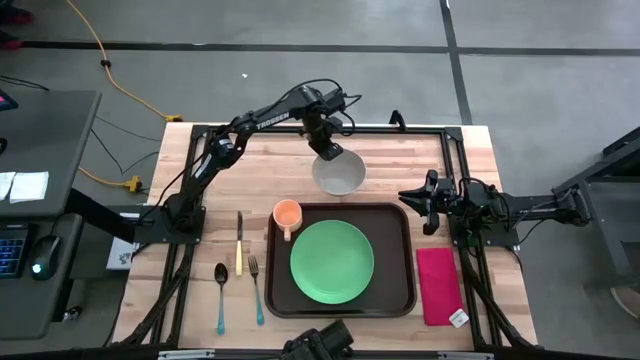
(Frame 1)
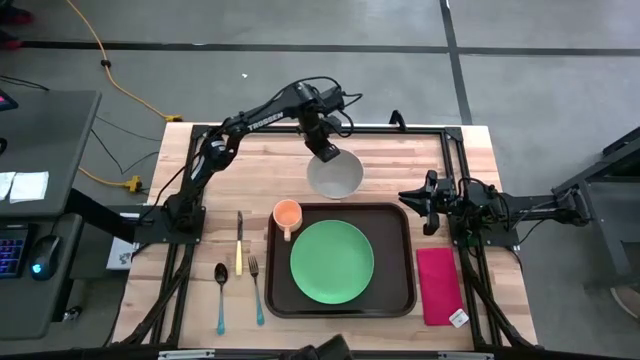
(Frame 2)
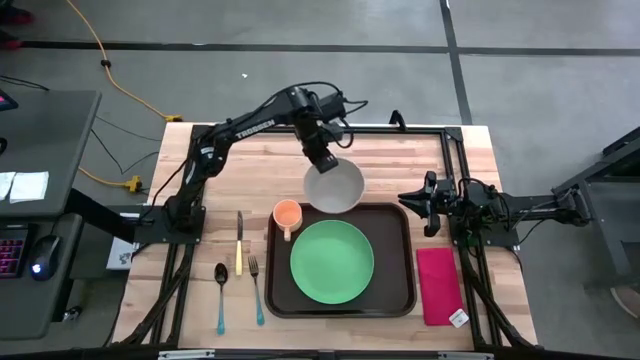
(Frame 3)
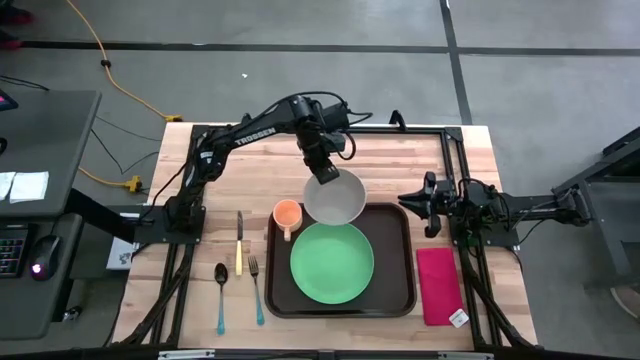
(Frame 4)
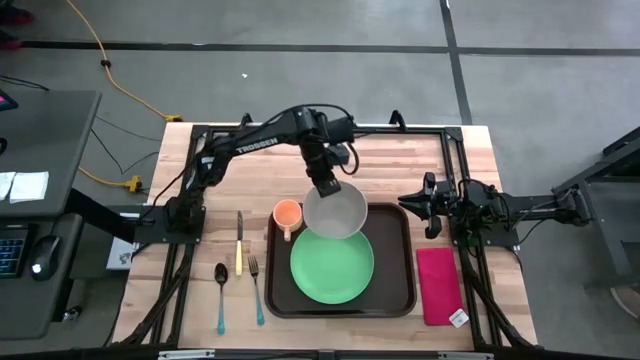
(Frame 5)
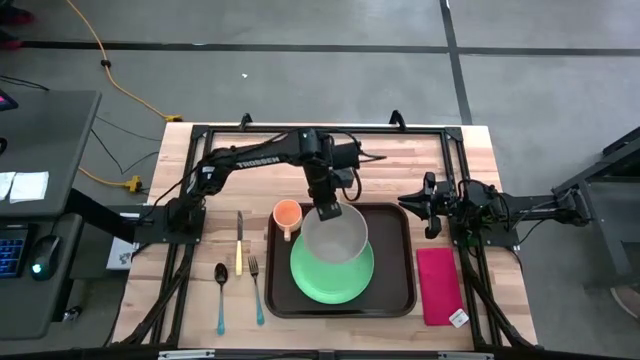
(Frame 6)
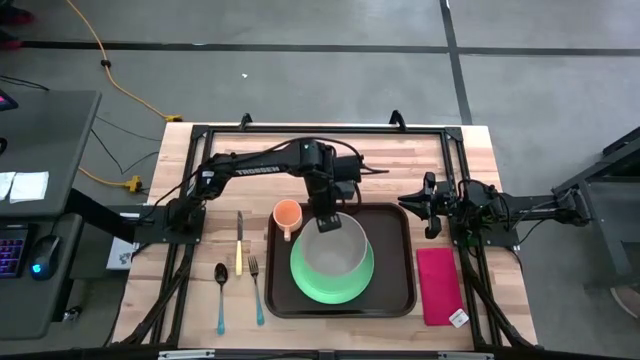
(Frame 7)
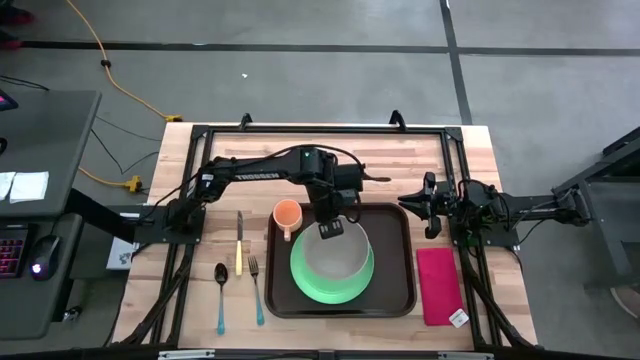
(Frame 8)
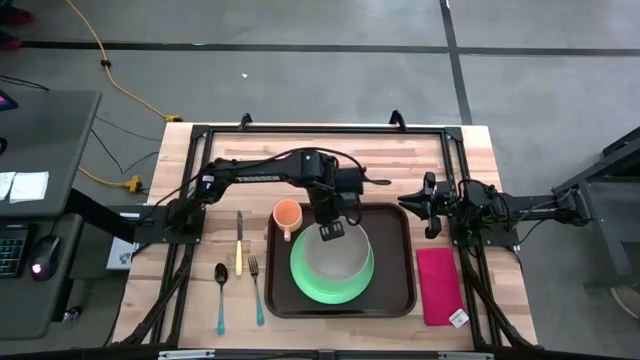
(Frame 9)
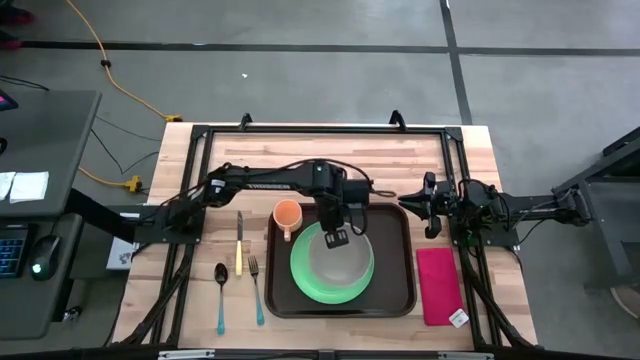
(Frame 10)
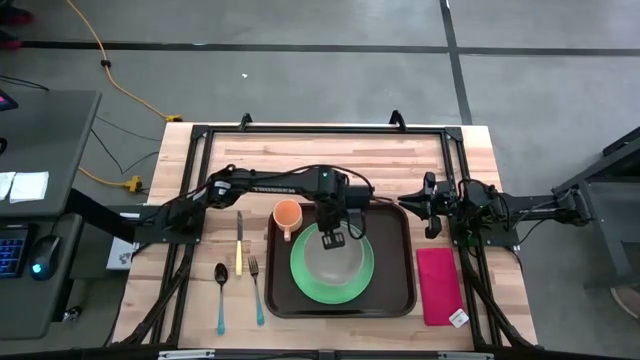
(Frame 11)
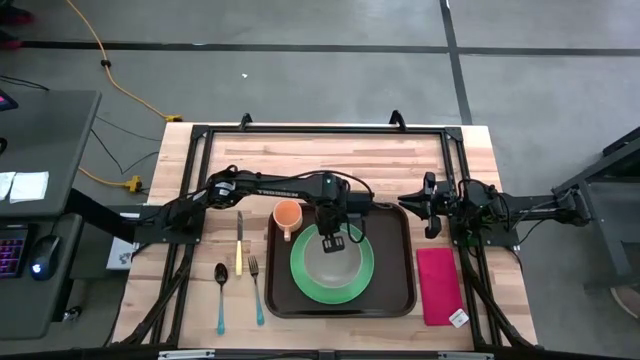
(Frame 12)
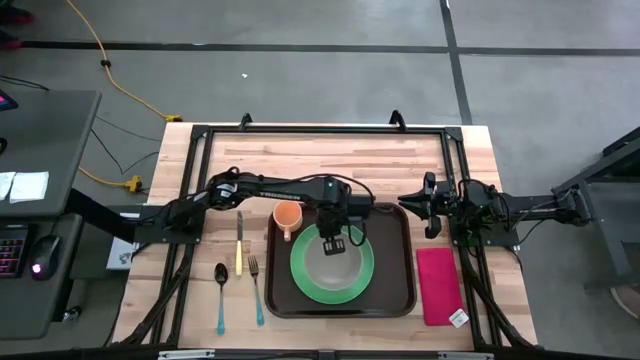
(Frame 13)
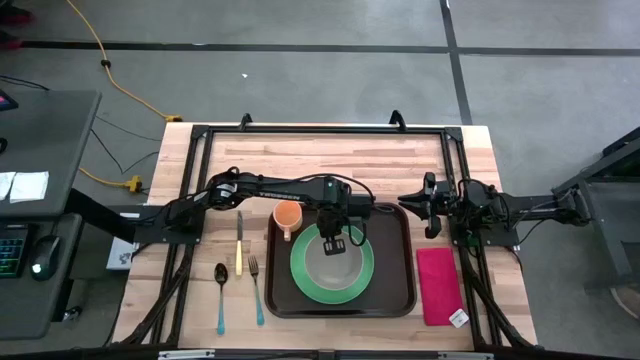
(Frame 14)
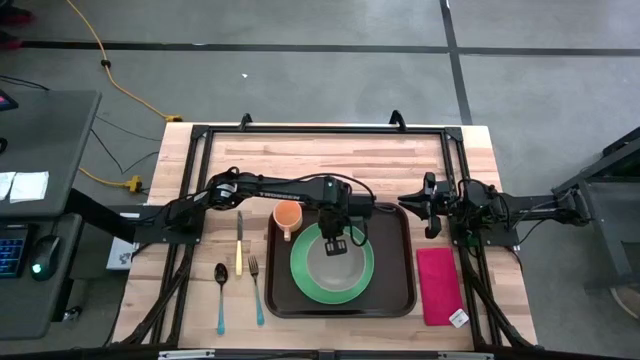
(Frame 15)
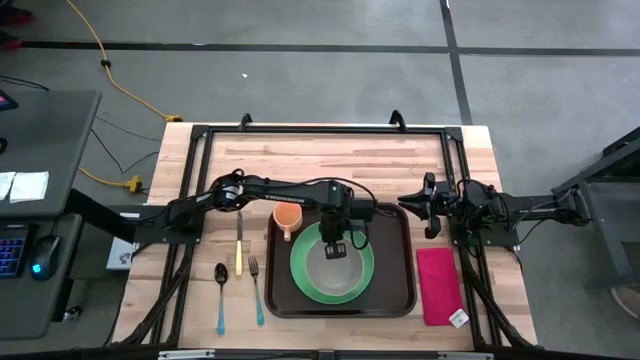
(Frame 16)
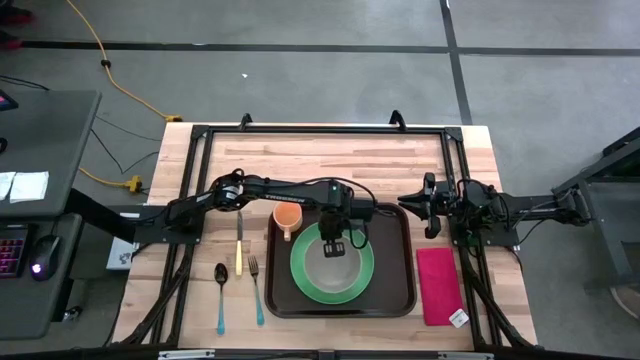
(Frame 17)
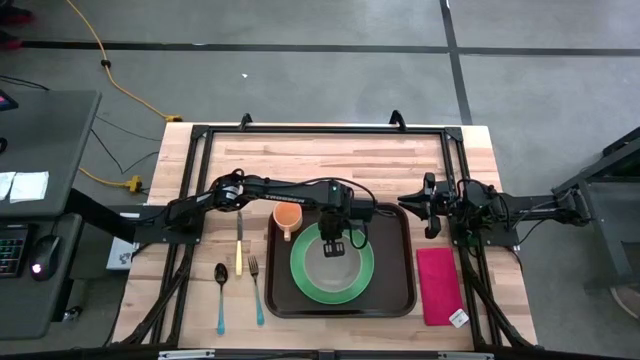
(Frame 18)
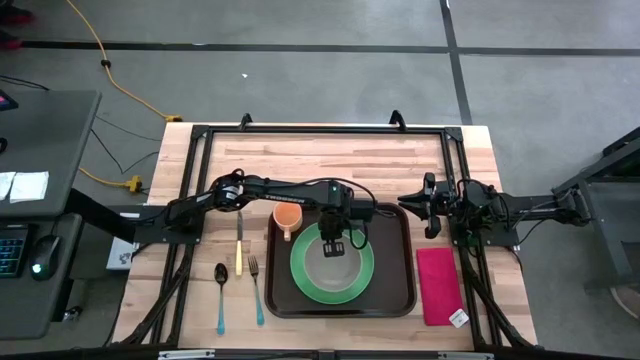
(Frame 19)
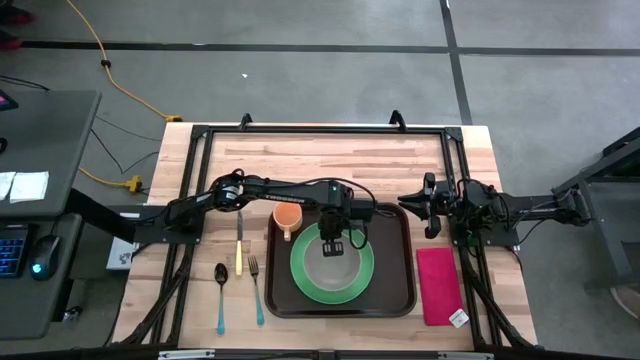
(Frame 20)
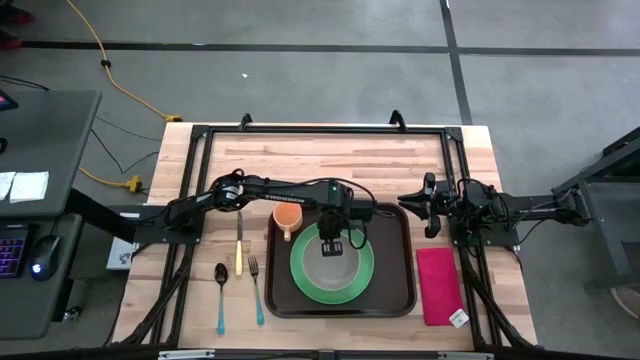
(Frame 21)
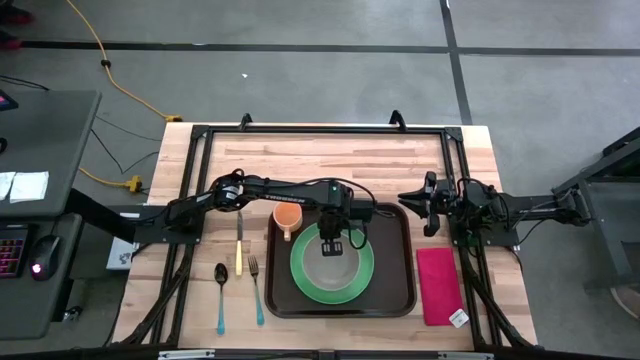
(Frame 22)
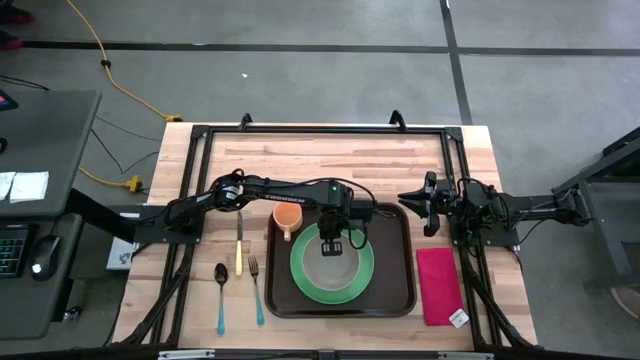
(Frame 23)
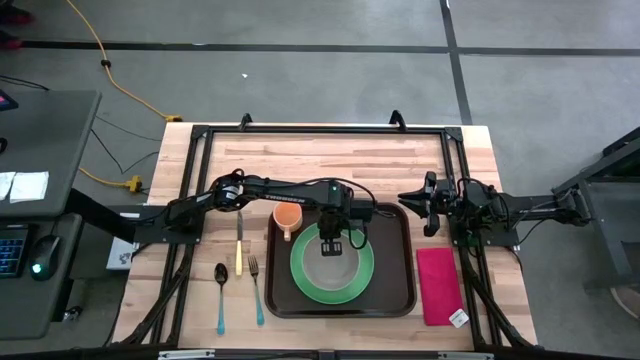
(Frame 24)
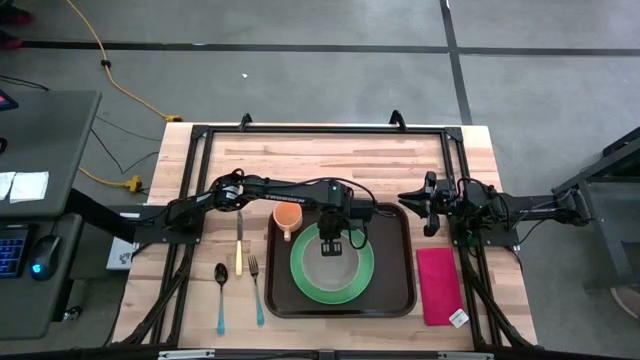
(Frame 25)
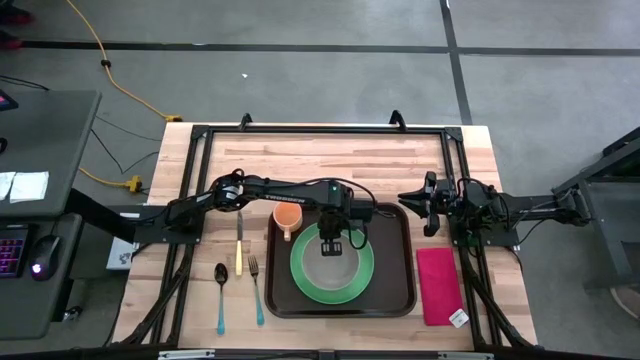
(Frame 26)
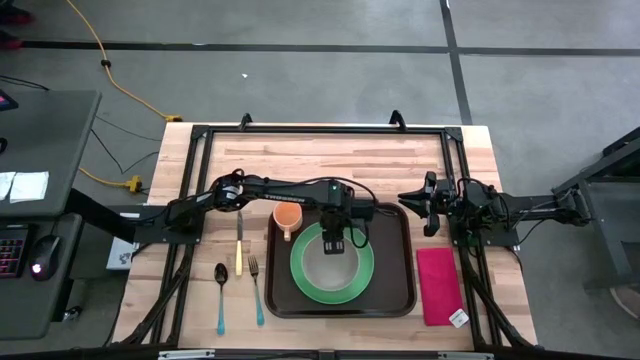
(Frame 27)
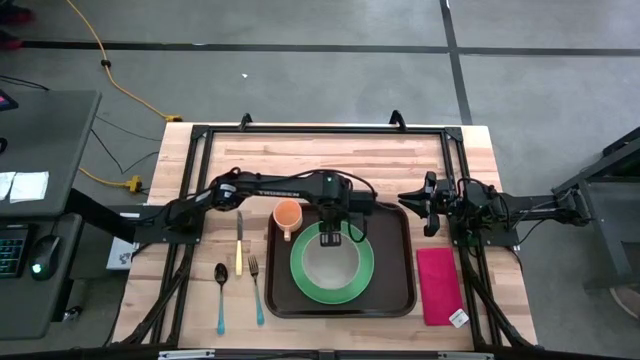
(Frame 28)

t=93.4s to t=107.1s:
Task: Set up tray
Put the gray bowl on top of the green plate

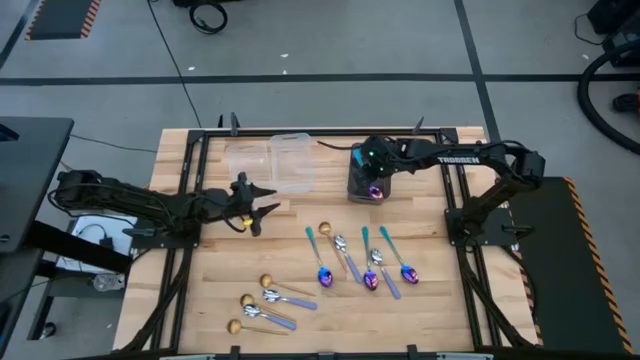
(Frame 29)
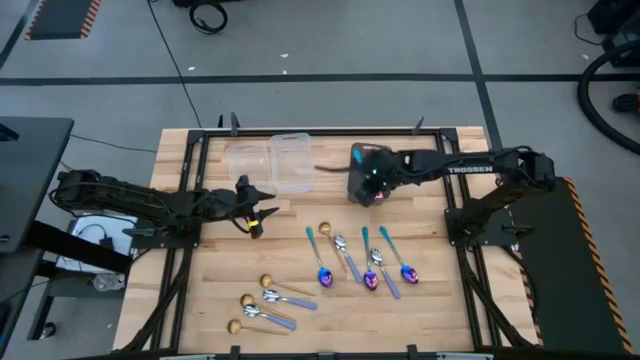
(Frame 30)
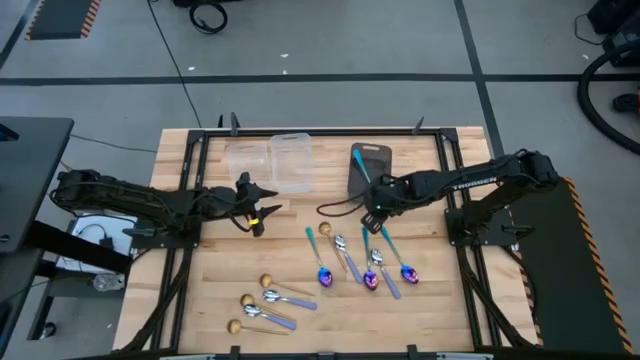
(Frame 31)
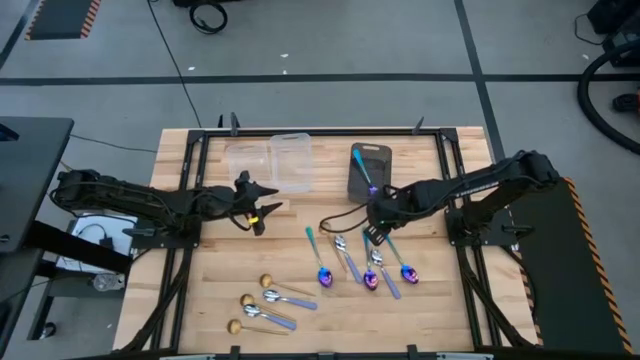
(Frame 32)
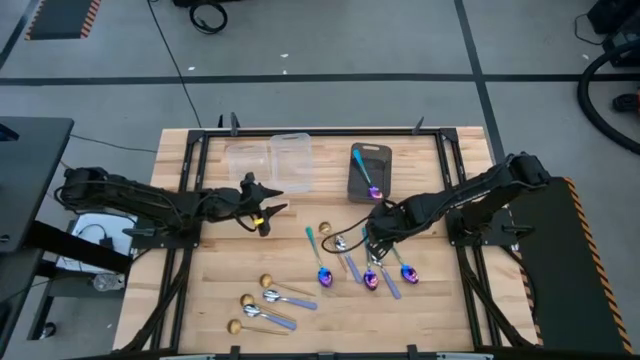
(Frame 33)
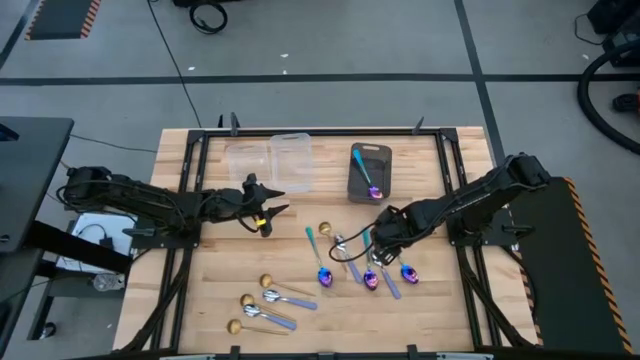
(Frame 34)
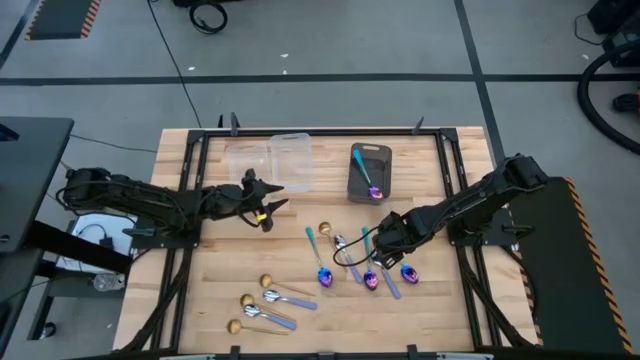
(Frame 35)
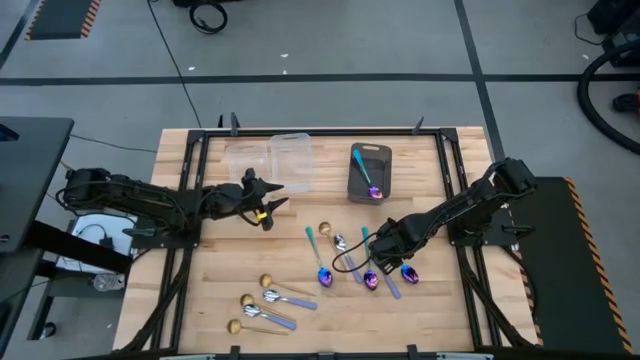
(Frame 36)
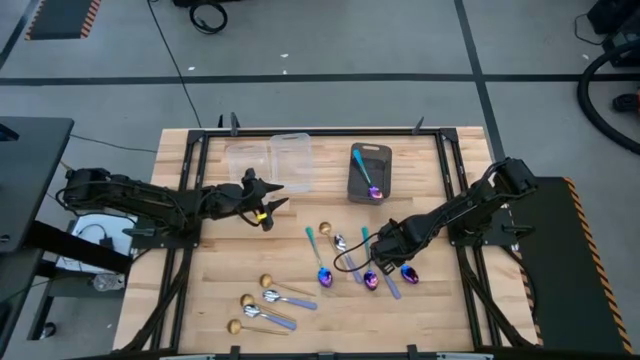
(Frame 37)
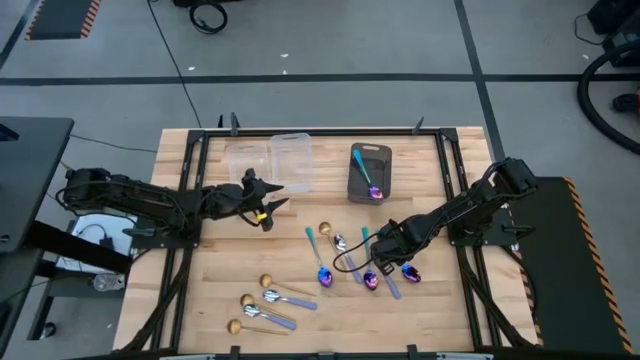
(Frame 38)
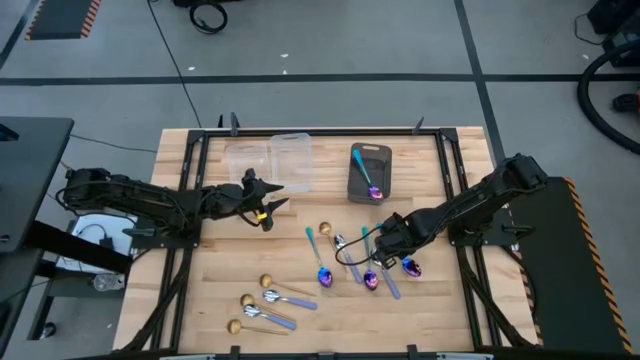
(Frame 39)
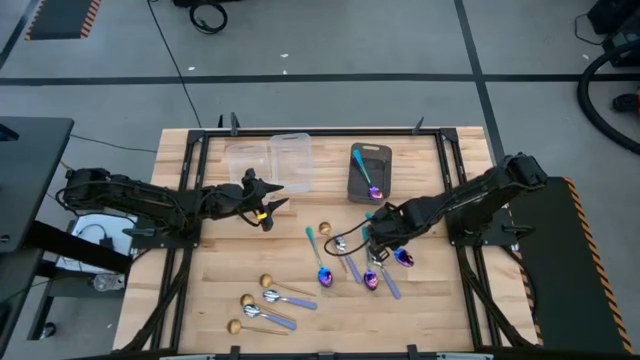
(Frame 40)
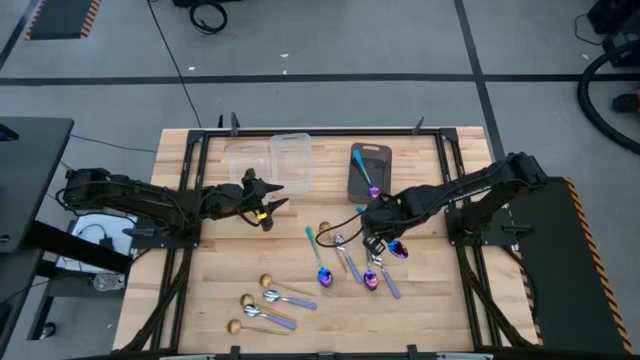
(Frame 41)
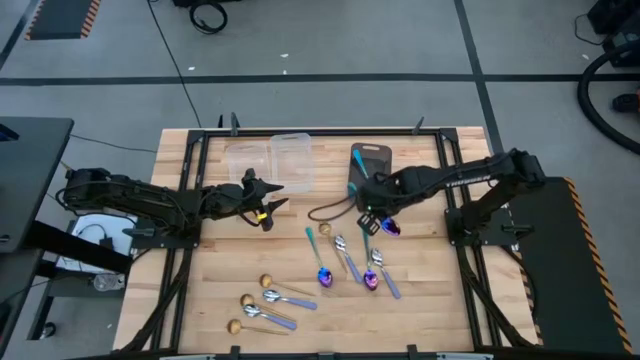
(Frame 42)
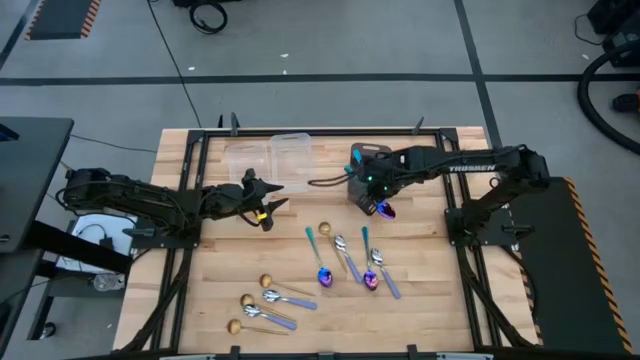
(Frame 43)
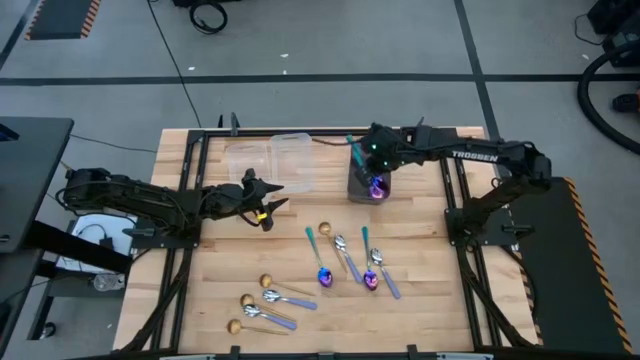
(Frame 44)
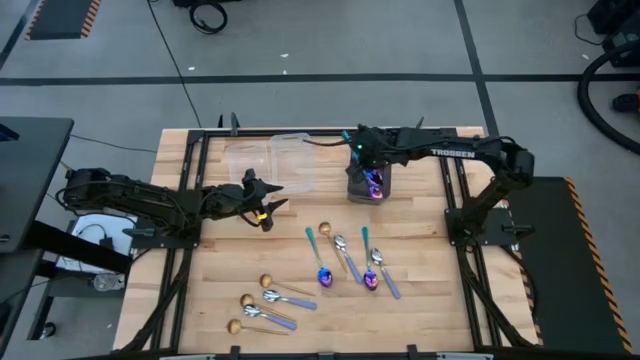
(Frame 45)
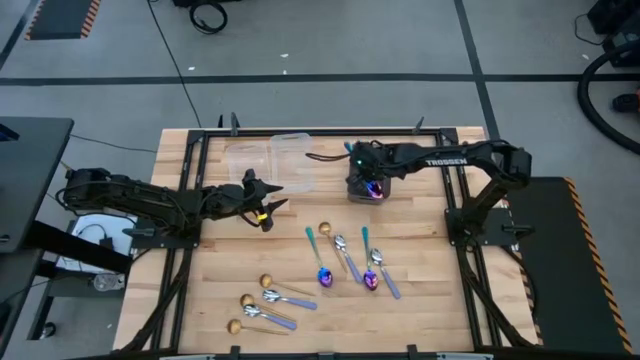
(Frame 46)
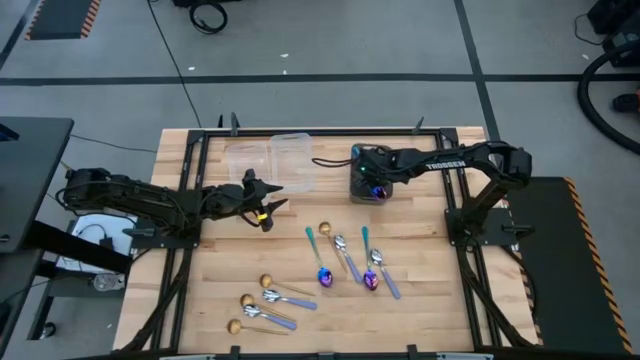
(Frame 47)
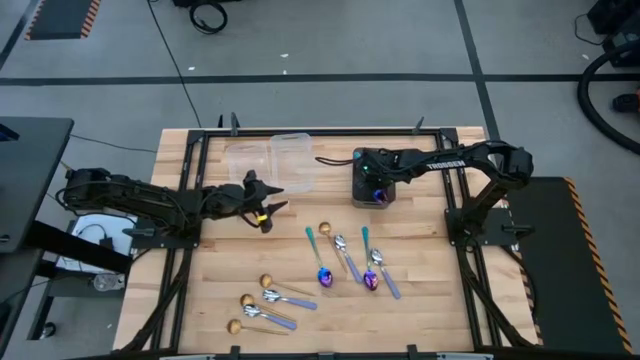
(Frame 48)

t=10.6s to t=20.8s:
Task: Sort silverware by color (type)
Put the blue spoon into the black bin
